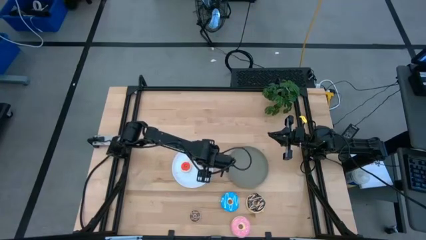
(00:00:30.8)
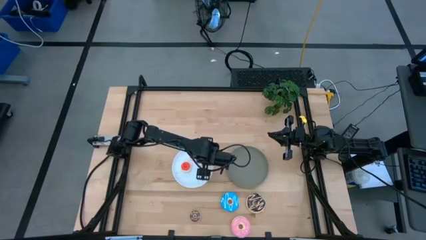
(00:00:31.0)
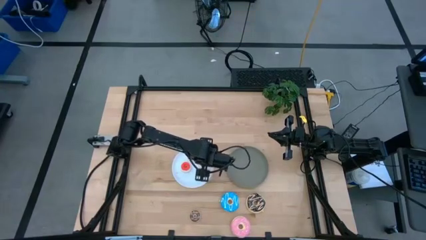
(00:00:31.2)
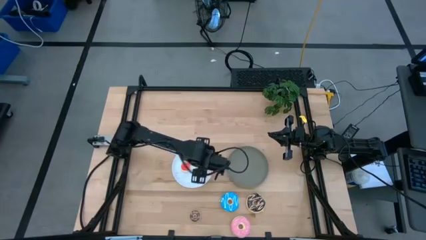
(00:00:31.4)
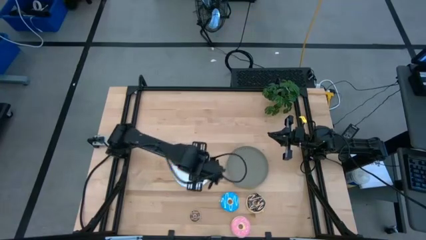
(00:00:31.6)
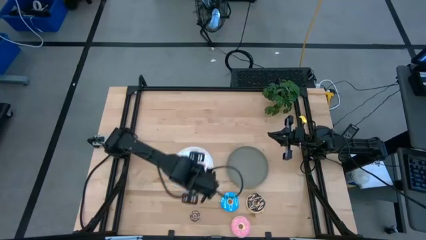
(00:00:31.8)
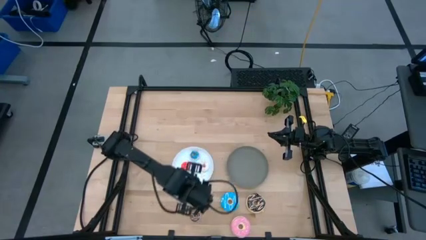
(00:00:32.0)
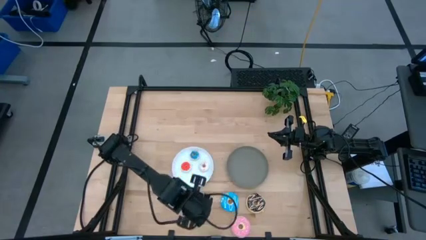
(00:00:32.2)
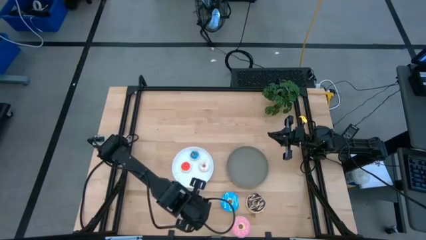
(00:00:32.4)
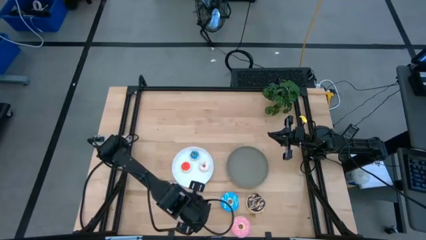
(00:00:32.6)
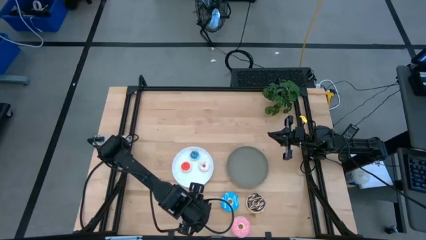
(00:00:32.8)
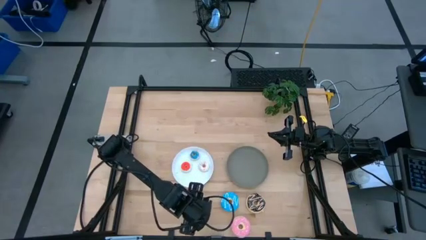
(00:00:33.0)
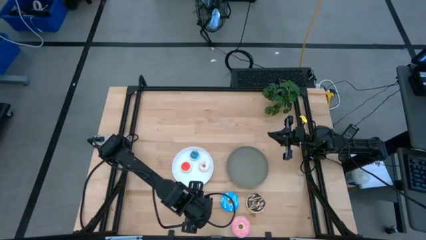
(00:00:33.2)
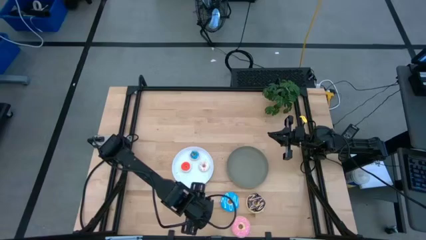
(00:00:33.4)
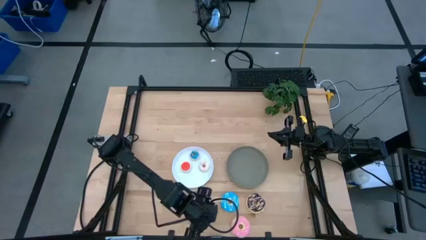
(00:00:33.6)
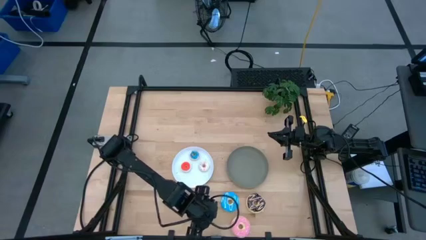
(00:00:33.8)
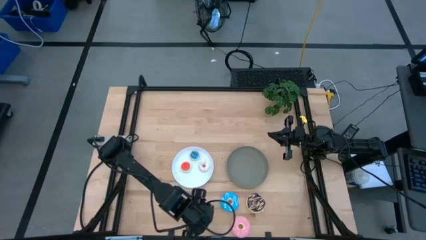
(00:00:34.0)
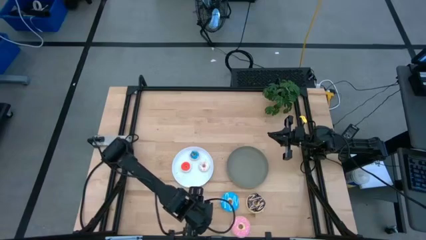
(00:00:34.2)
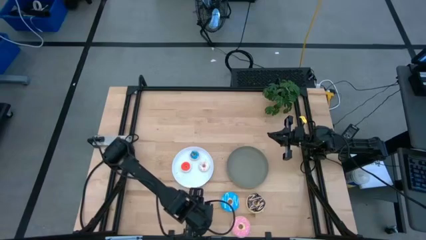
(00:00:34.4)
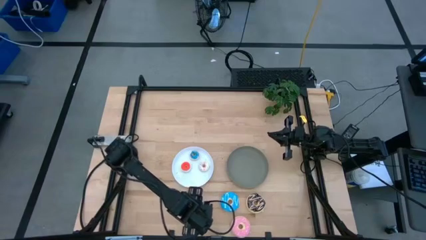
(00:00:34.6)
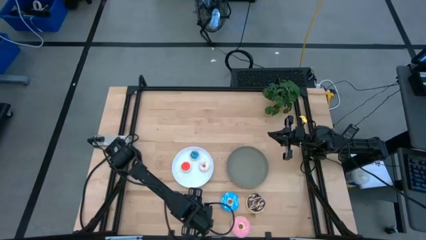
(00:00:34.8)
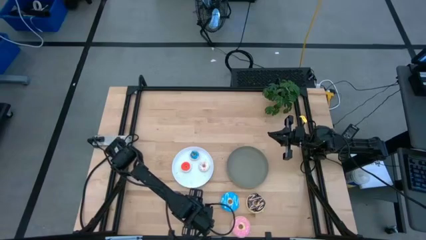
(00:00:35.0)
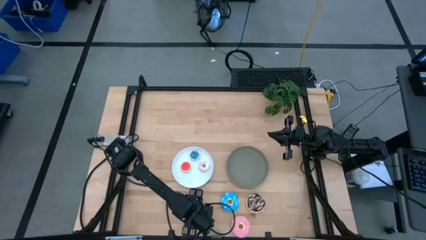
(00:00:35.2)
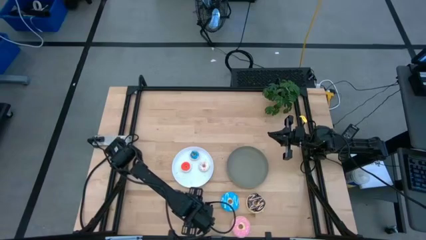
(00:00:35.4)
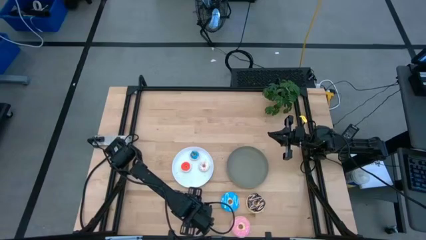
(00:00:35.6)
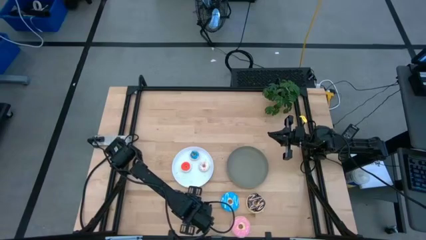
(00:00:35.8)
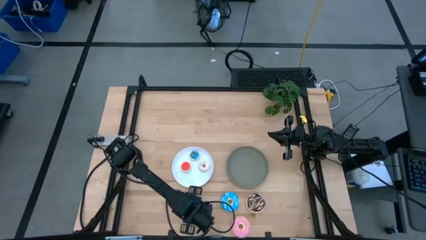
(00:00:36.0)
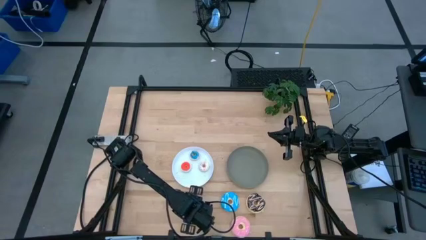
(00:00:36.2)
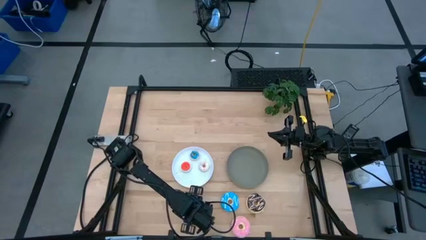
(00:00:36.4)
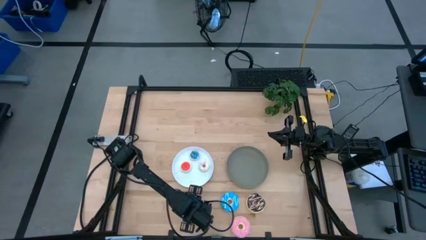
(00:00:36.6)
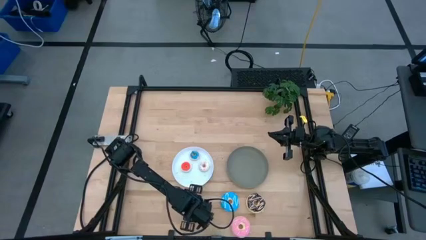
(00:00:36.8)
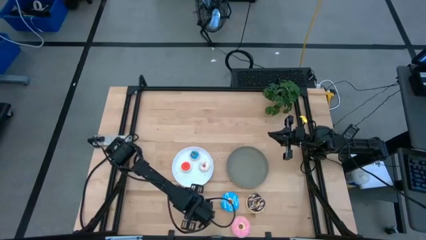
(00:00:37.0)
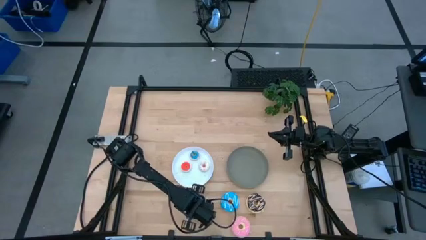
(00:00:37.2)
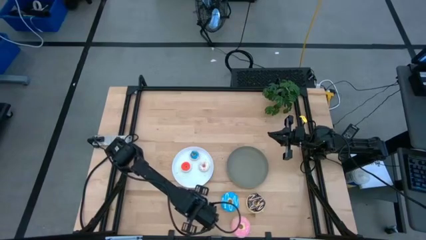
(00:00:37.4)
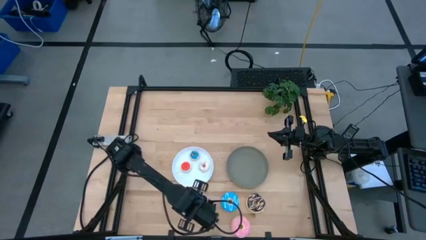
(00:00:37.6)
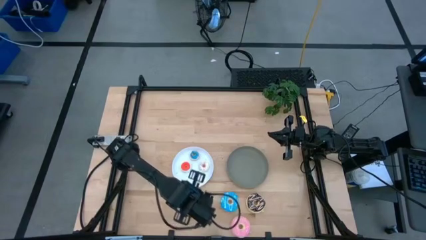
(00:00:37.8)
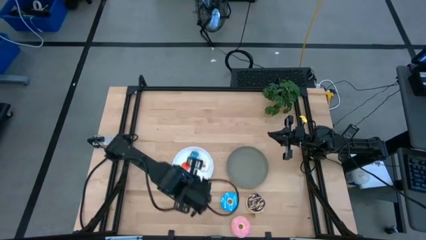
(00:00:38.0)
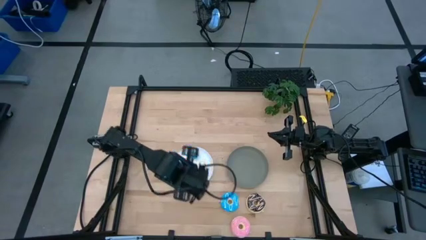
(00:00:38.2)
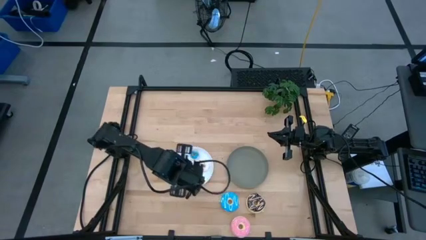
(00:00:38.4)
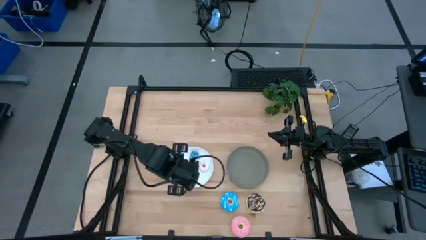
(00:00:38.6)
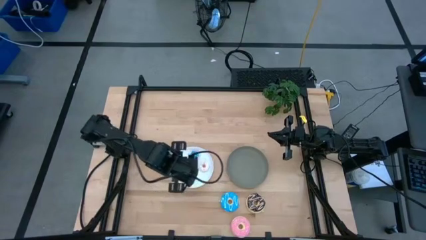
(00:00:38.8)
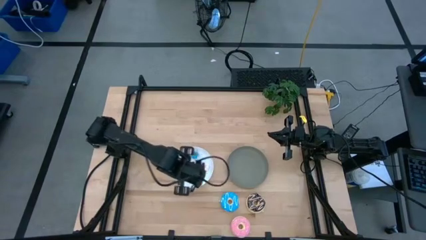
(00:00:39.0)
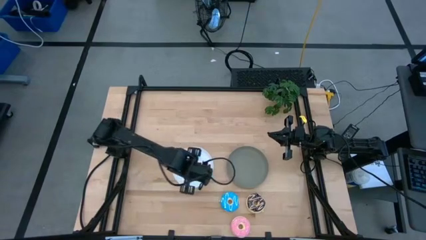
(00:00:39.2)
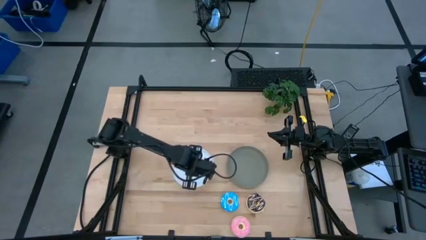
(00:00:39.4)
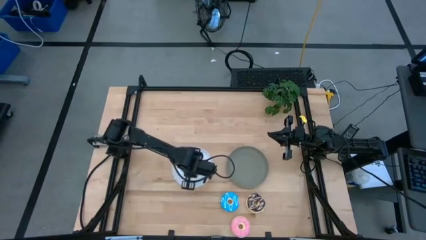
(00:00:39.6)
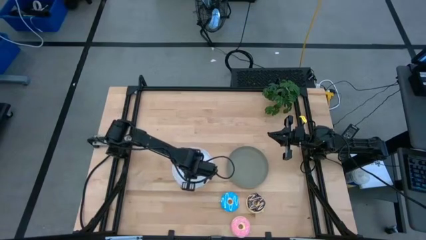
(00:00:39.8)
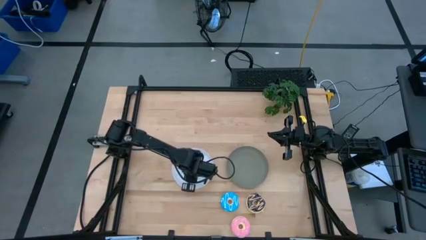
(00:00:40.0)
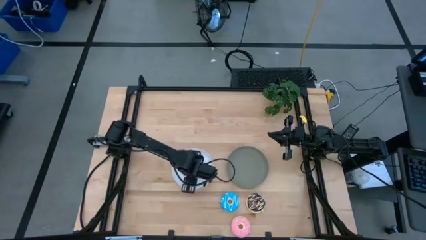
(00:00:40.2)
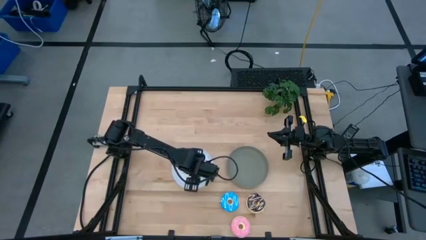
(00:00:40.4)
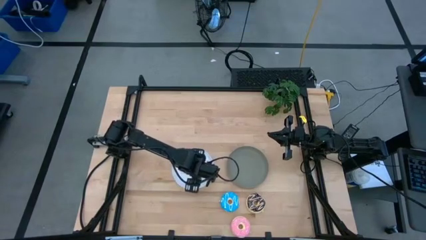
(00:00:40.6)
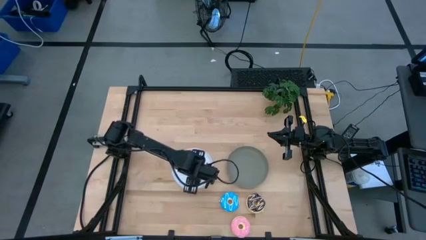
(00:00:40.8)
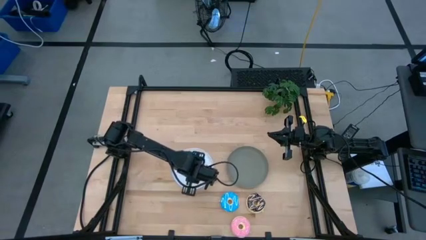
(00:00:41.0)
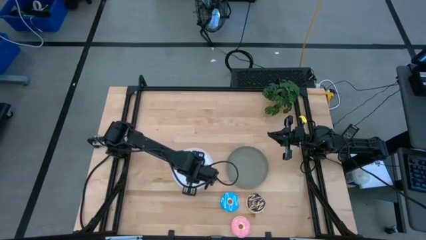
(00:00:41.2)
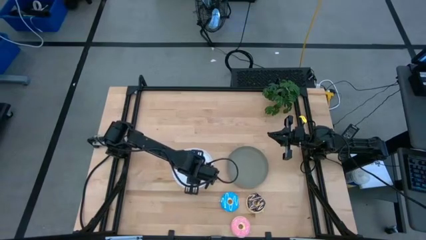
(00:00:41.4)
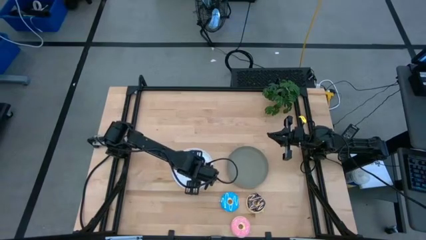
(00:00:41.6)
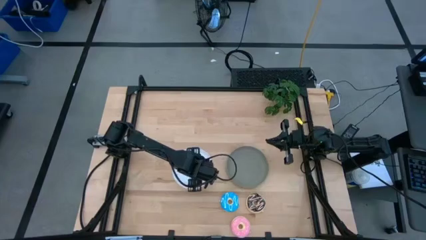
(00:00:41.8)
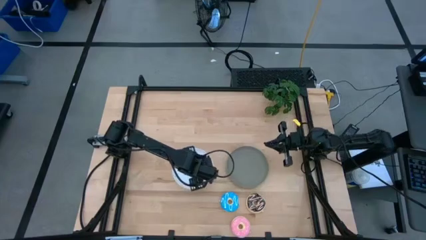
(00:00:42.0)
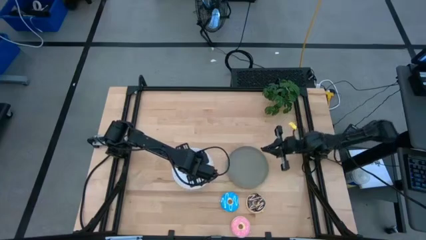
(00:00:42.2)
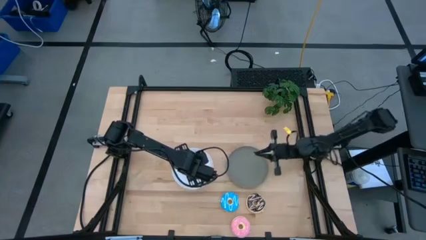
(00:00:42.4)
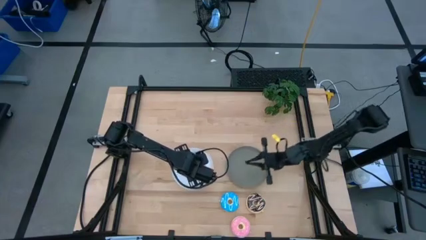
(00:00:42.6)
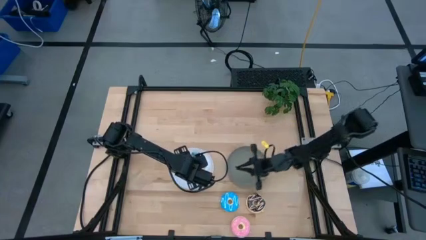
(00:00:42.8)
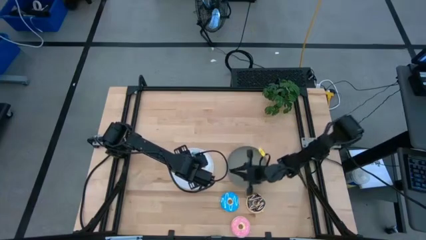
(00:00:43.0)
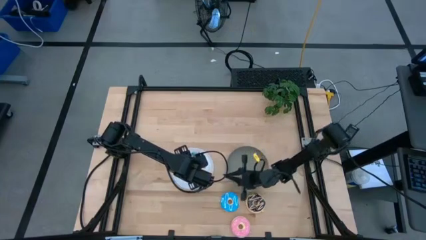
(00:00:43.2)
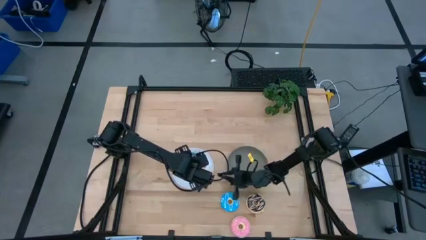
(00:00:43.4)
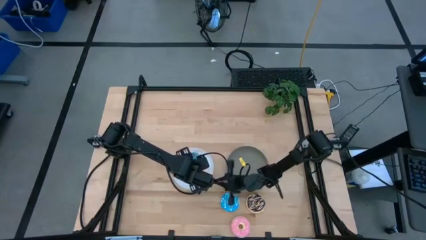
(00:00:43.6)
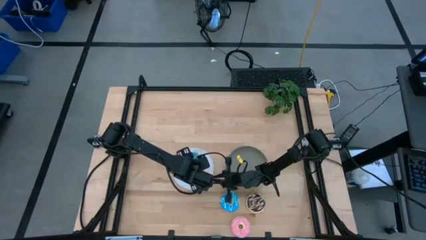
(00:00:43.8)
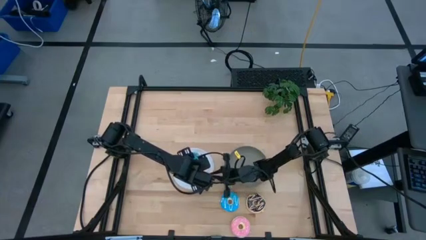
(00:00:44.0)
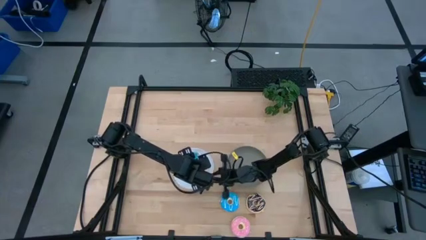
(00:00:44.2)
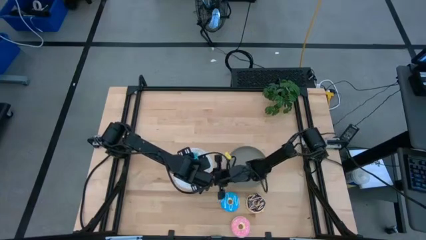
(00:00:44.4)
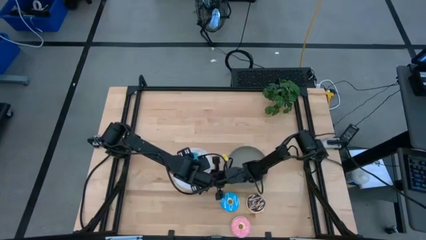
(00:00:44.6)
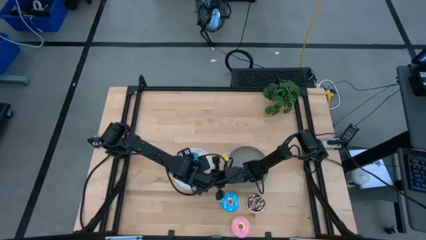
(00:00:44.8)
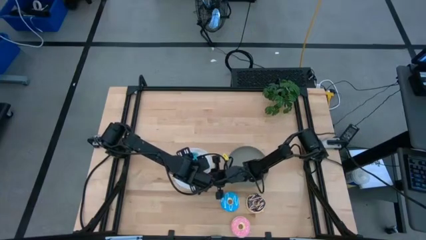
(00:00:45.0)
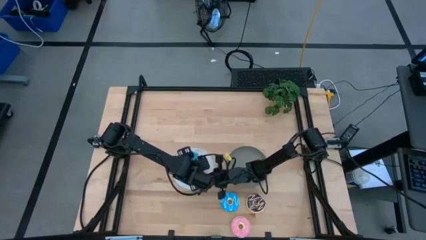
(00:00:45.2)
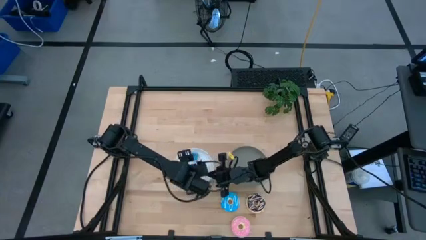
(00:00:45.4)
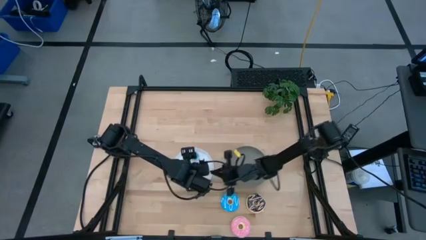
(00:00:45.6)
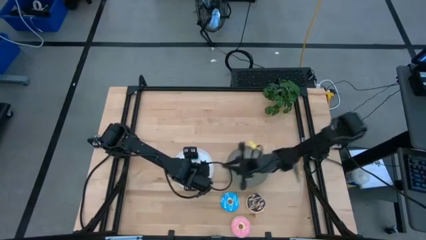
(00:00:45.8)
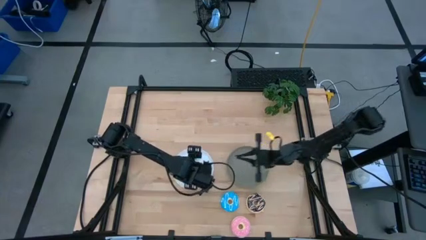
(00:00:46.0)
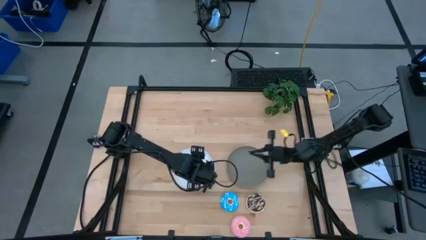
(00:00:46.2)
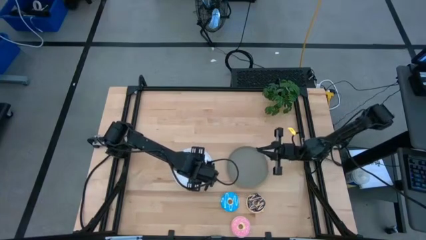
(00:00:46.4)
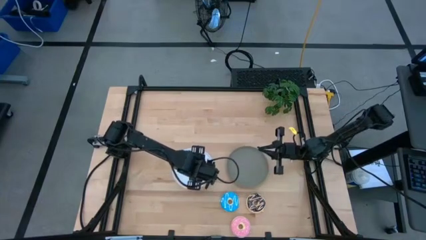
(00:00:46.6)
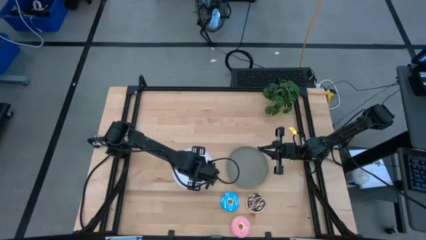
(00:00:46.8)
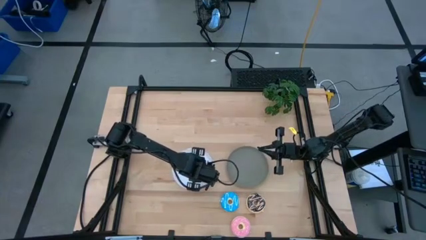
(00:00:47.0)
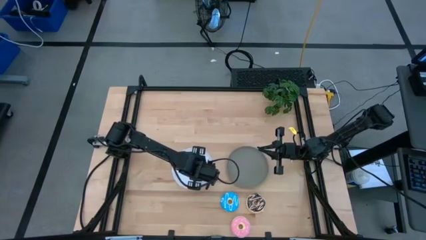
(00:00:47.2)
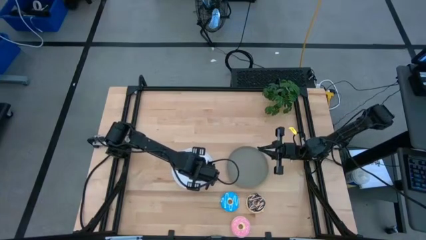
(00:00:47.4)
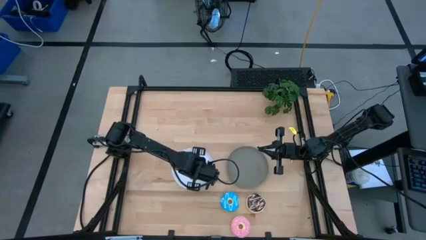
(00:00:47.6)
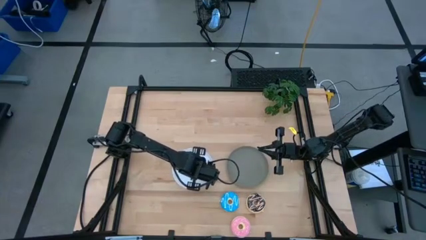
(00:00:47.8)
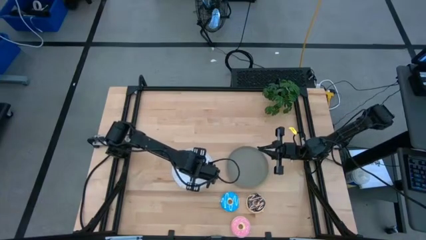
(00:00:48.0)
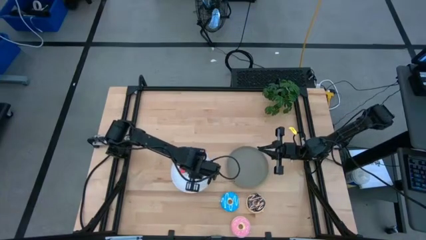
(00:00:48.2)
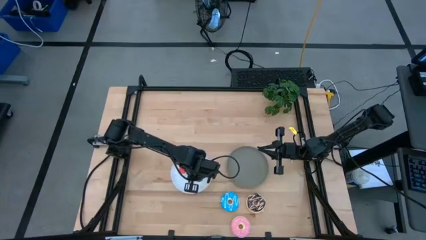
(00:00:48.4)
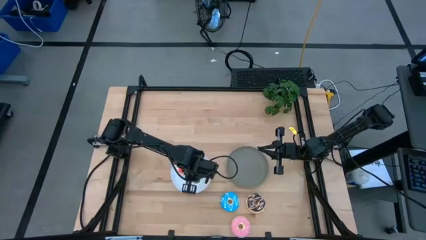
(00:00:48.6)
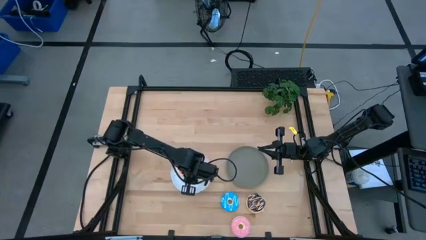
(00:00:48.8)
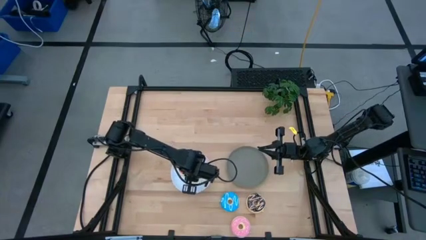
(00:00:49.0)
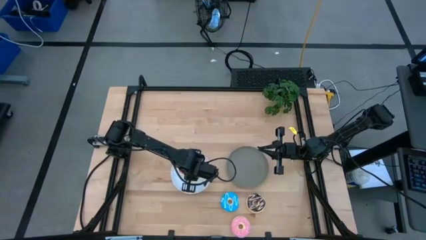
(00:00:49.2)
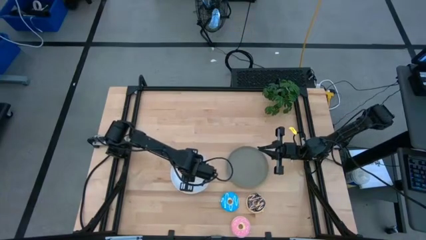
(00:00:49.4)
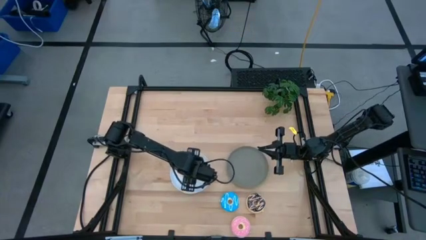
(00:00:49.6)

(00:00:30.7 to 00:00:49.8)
Task: Pick & Place donuts
Put the small brown doughnut on the white plate
